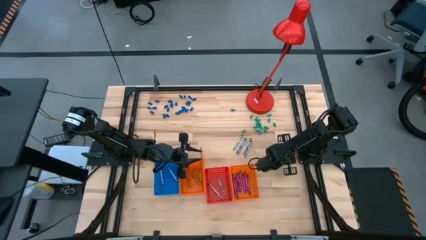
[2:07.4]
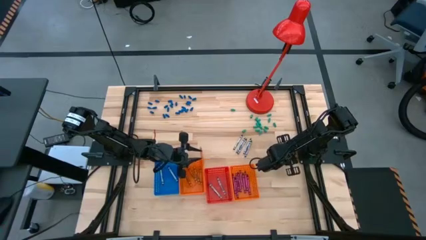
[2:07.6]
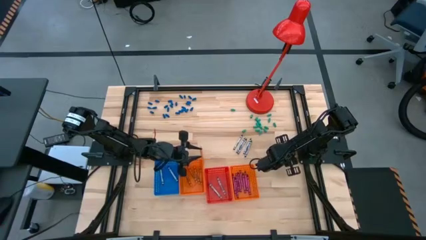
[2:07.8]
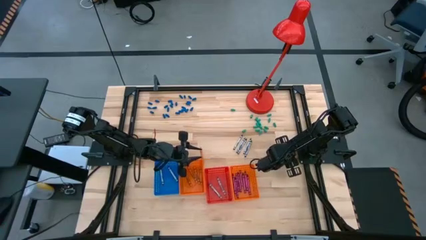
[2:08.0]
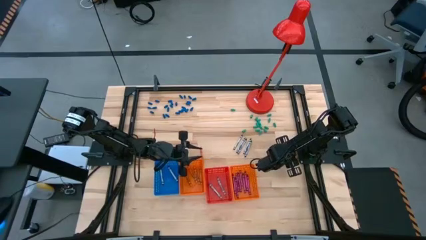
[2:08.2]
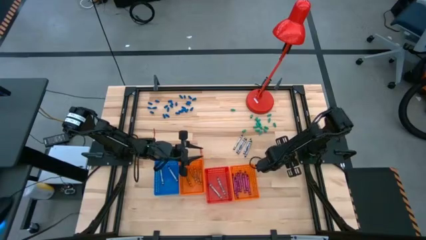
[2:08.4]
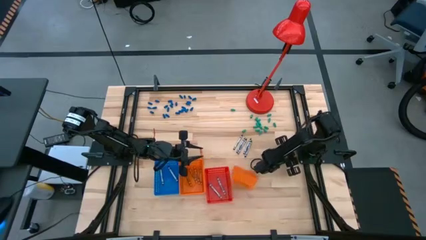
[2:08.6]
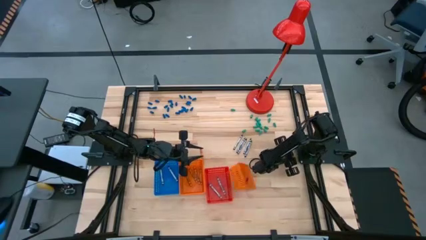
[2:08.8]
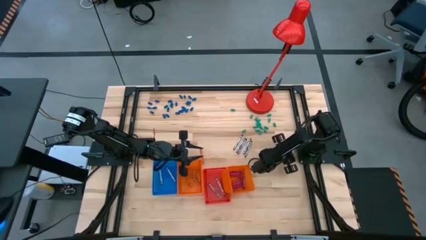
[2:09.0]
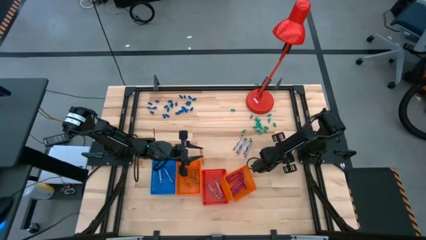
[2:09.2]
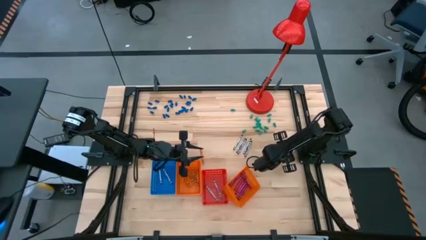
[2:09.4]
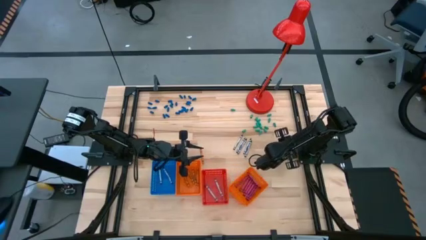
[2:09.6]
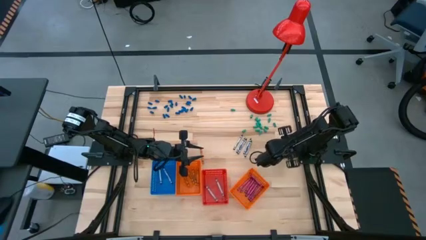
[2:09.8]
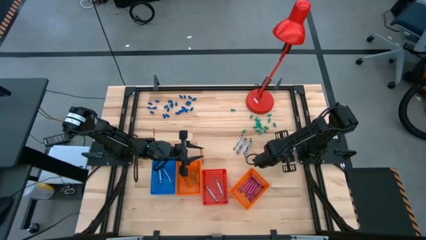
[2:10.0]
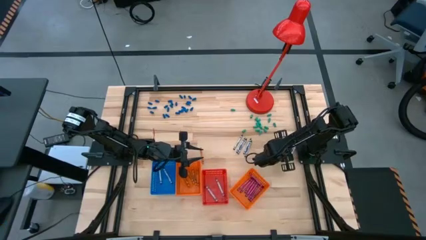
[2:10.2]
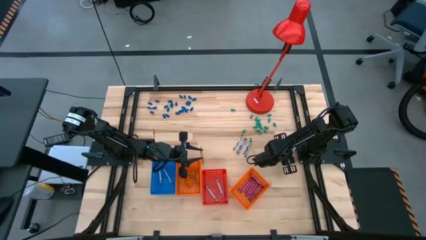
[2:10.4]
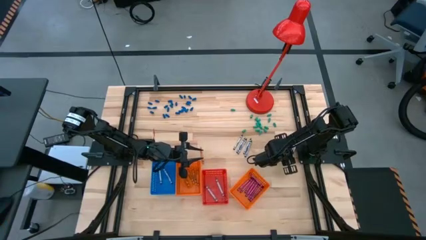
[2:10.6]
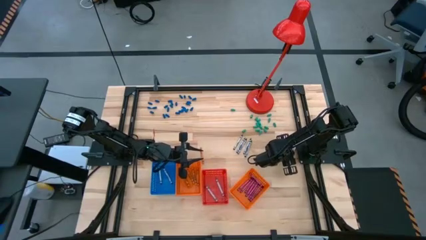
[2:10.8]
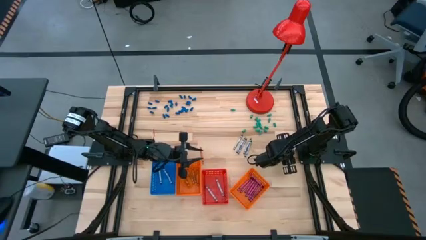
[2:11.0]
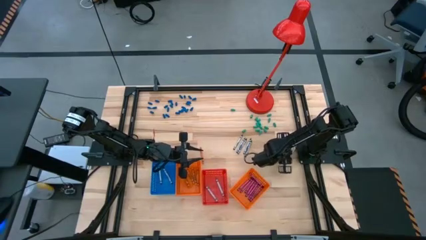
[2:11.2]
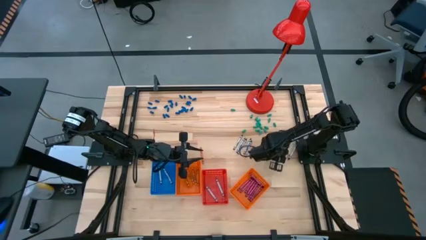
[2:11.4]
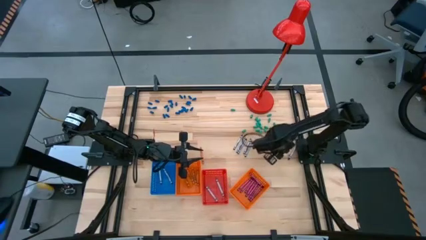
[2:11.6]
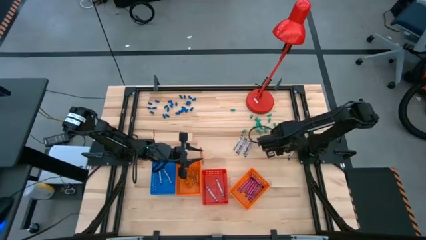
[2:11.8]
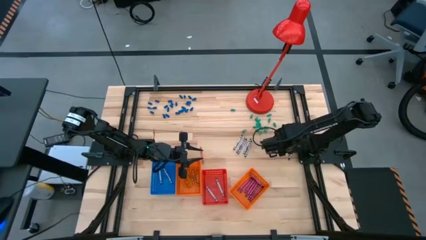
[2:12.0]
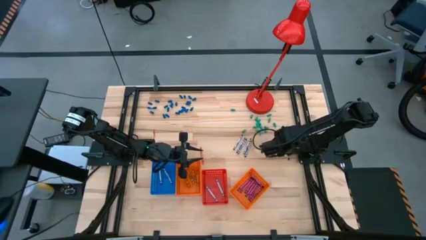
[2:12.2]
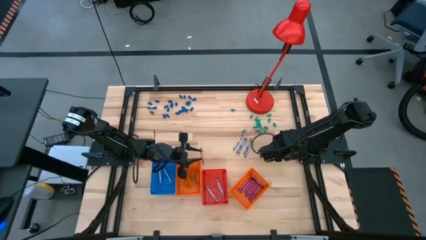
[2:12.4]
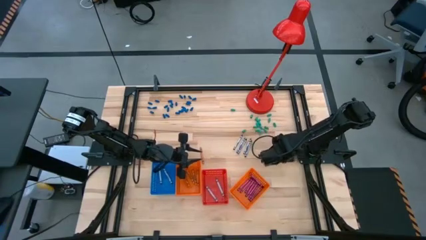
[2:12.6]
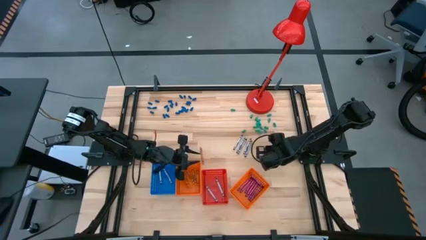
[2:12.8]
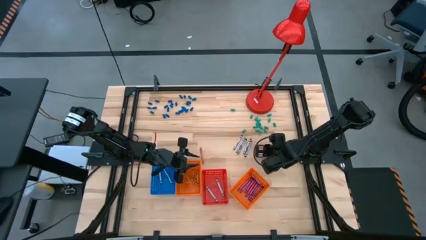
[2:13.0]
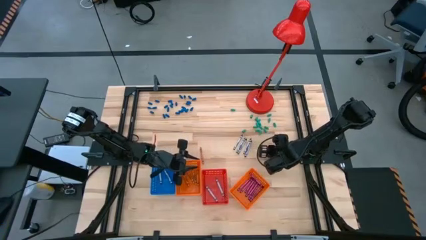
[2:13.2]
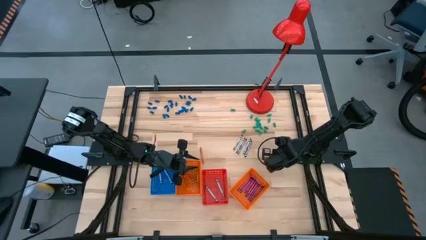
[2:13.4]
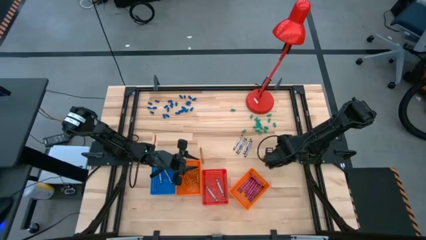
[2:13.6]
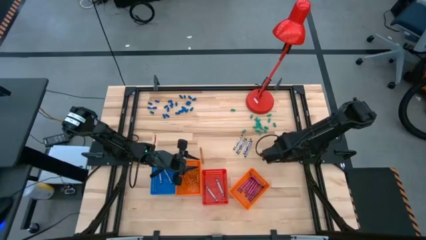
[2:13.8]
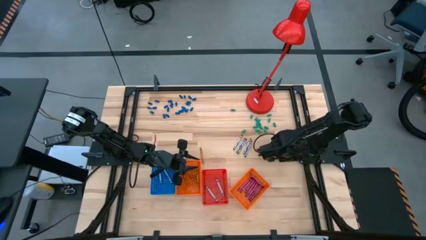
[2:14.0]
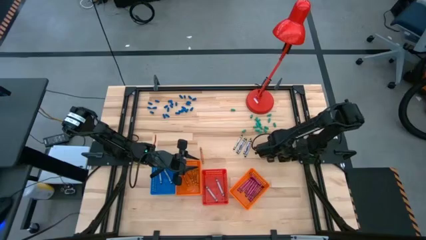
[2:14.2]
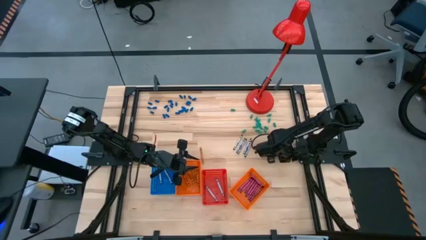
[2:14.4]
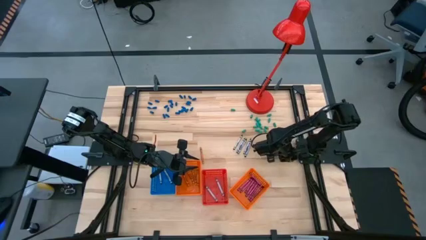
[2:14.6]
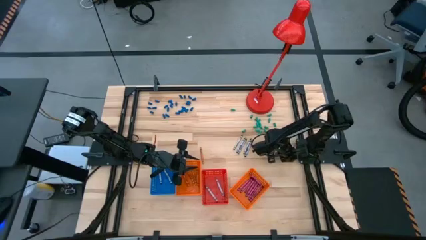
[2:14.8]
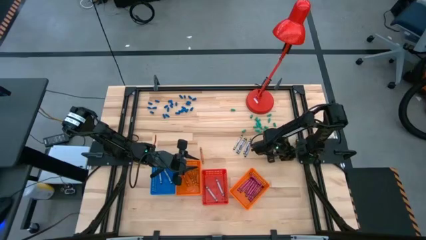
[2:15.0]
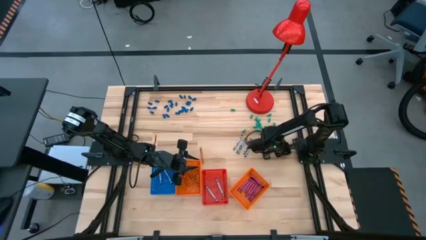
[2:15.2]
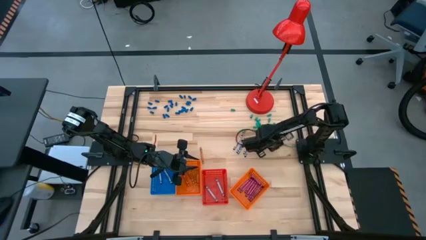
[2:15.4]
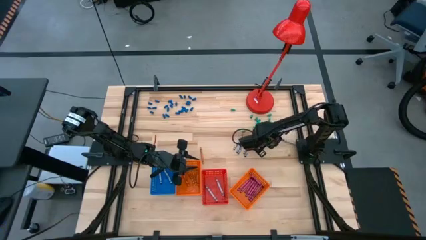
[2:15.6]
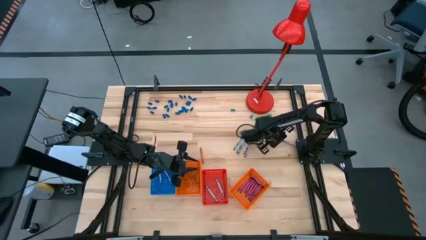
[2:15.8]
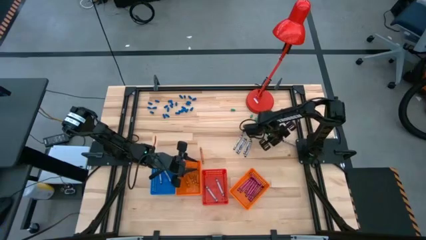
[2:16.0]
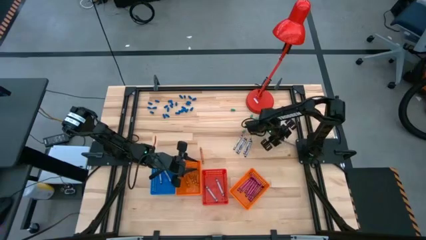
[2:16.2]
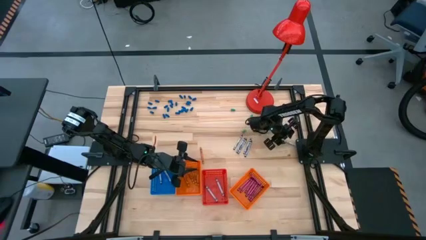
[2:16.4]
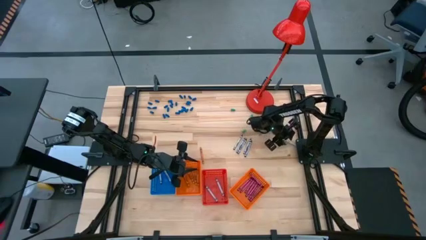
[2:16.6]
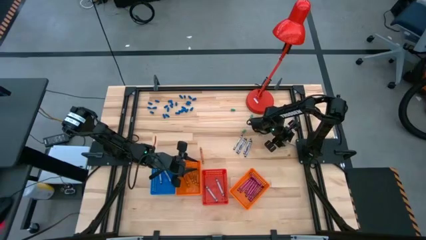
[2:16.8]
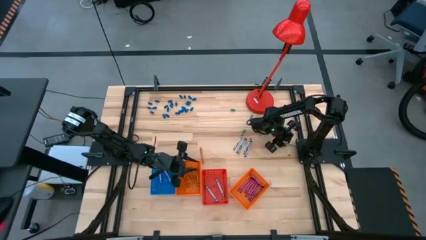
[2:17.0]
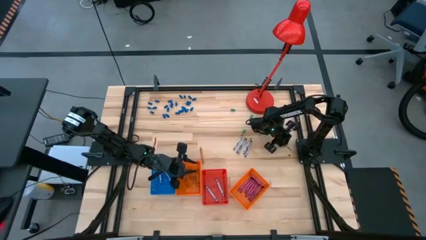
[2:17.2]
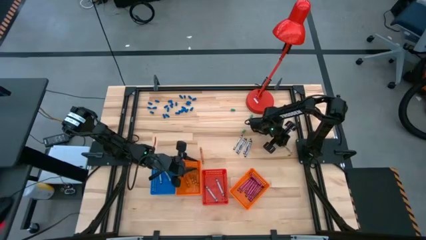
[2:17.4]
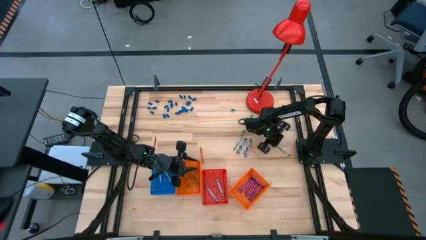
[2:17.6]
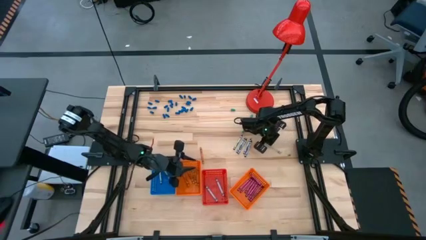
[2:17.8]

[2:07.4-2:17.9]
Task: Sort crayons
Put the black crayon into the blue bin

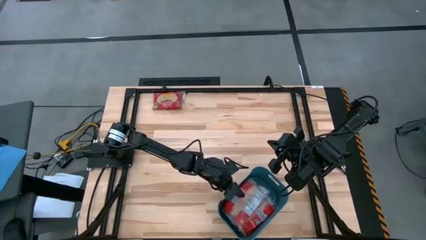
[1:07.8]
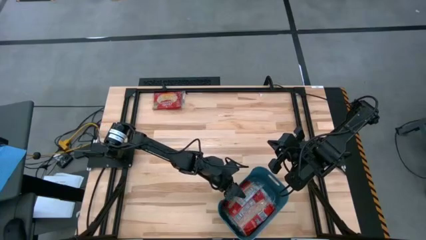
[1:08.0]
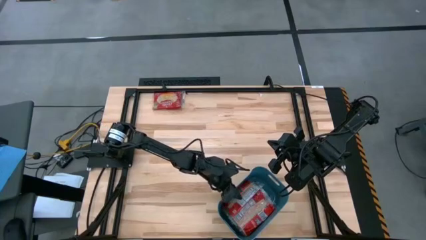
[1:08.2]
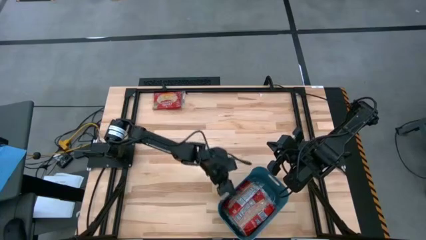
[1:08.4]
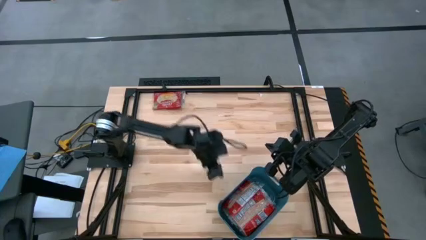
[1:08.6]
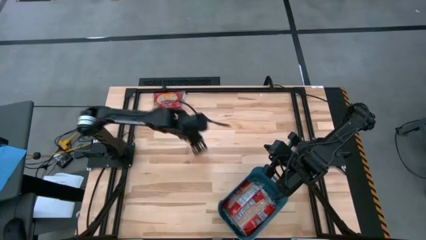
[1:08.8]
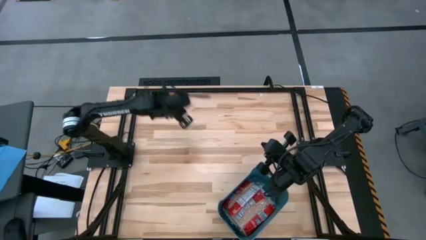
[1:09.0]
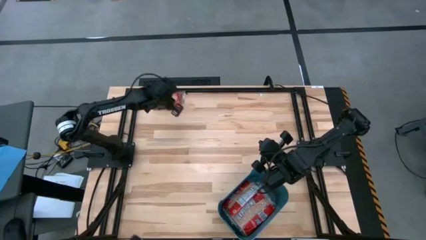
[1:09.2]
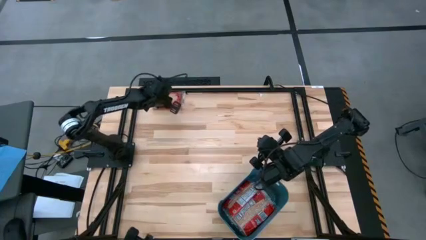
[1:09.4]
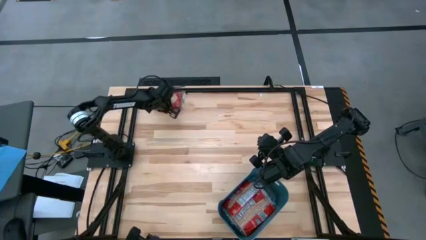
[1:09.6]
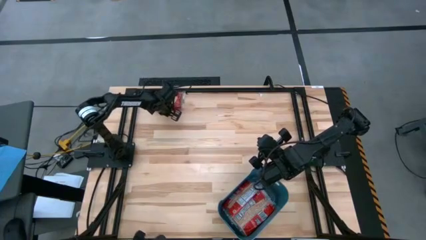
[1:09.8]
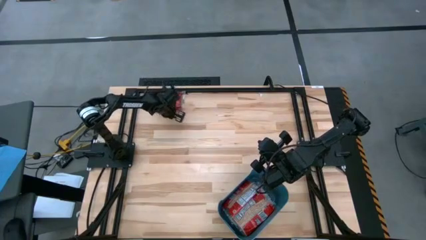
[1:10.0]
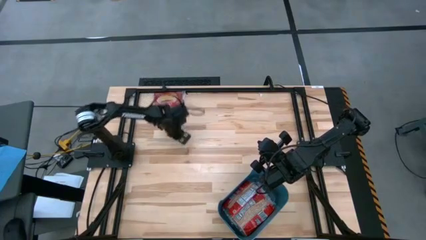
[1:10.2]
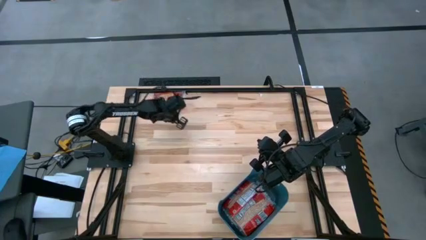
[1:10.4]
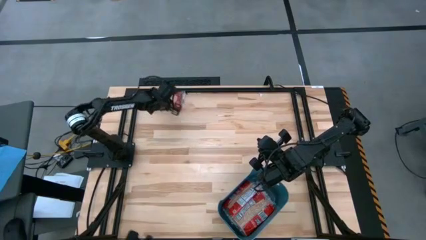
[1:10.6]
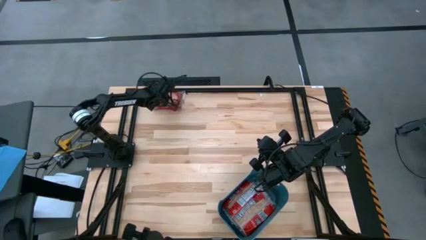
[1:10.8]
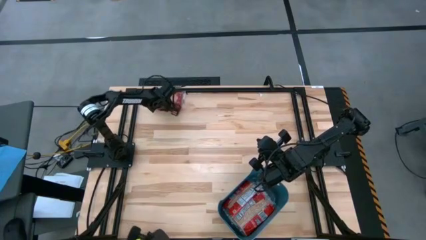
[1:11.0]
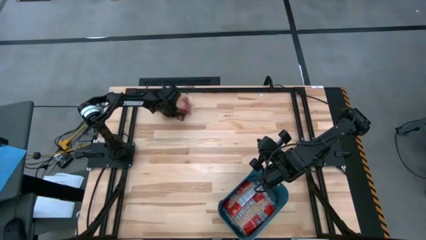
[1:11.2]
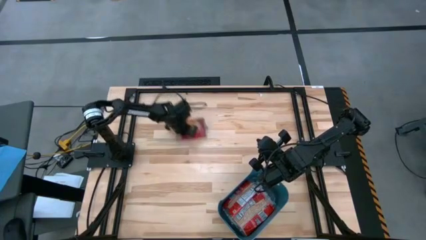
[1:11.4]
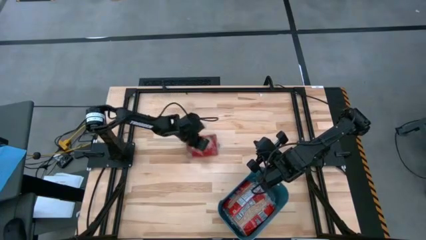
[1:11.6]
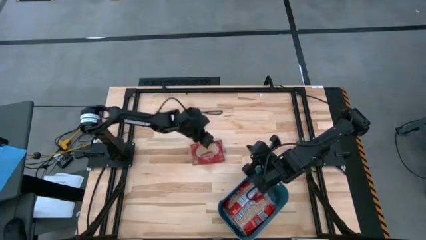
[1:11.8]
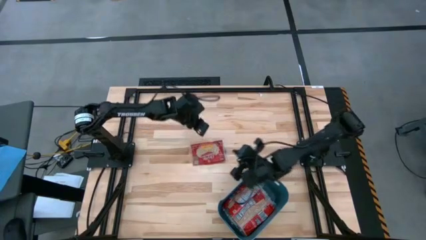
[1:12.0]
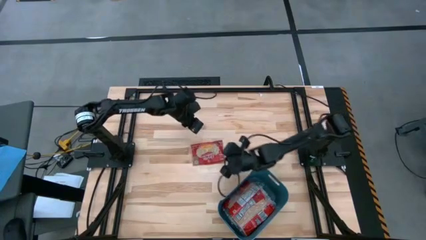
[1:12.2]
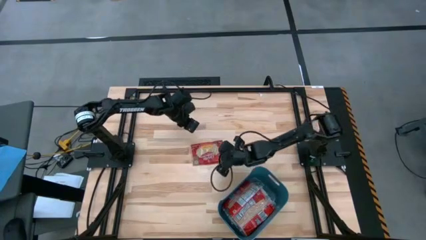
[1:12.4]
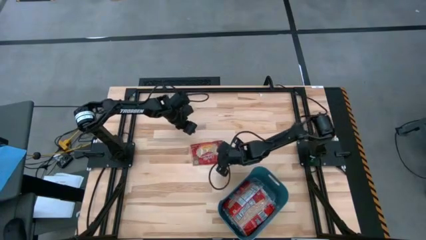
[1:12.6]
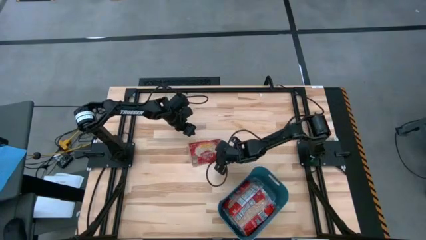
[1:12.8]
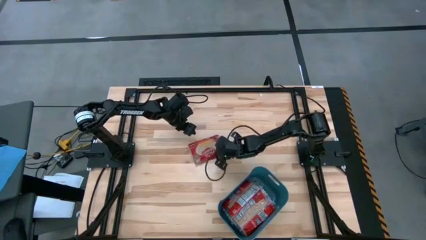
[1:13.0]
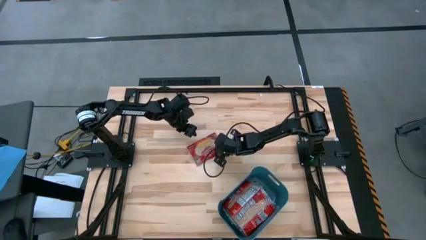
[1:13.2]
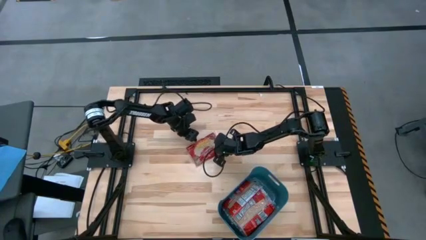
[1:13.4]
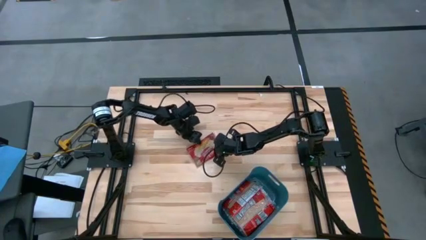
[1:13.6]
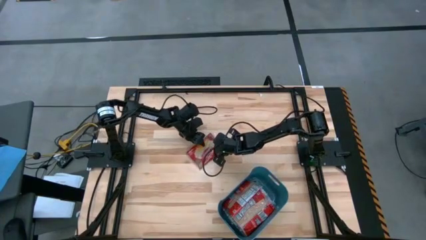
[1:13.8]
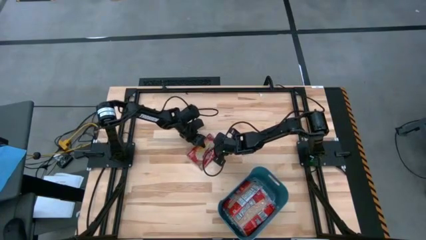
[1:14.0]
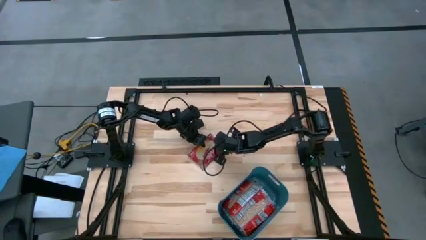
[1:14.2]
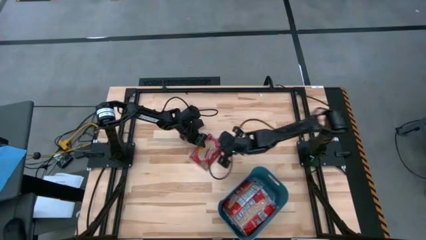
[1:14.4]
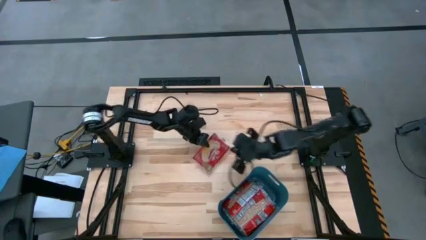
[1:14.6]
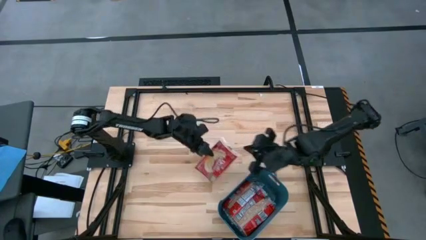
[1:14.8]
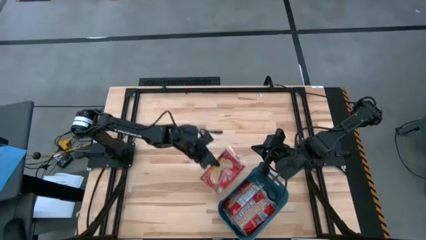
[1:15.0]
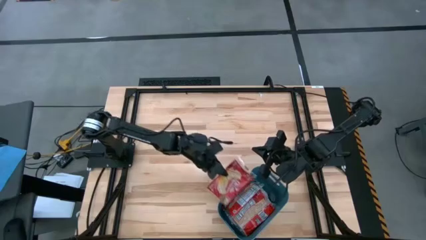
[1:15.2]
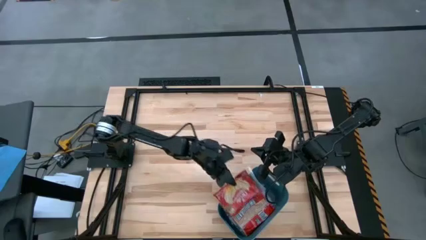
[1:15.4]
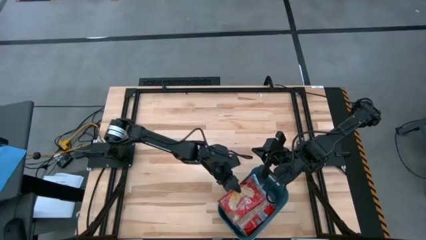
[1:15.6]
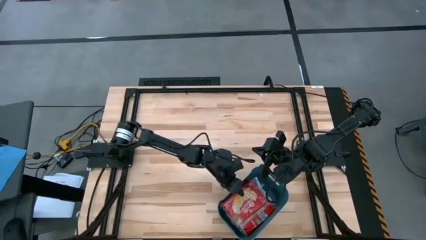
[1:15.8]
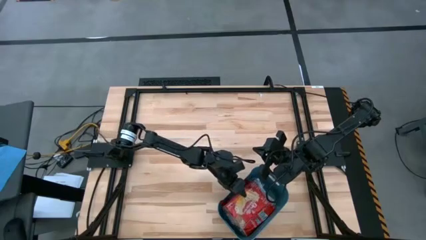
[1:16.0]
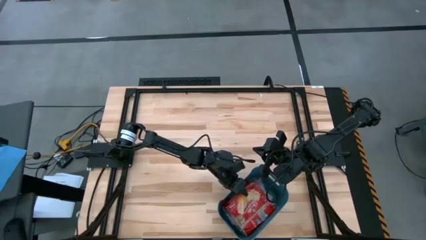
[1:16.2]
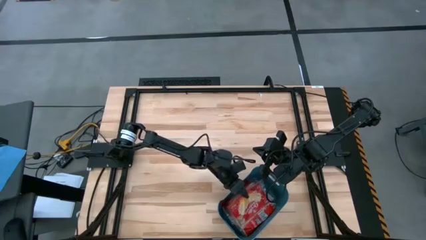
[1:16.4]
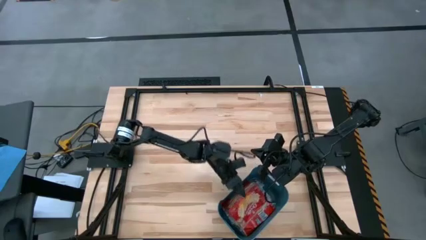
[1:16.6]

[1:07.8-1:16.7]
Task: Sort popcorn bags into baskets
Put the popcorn bag into the blue container
